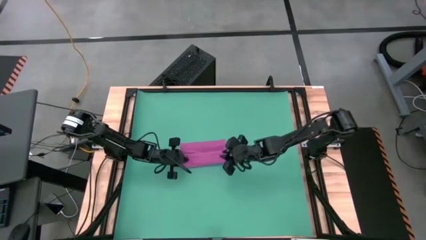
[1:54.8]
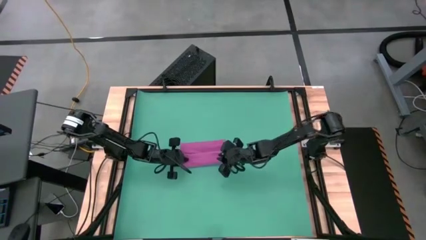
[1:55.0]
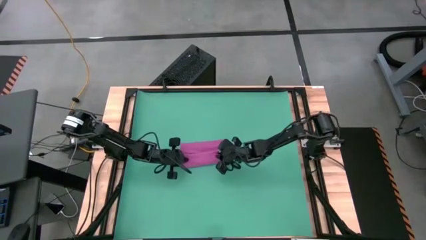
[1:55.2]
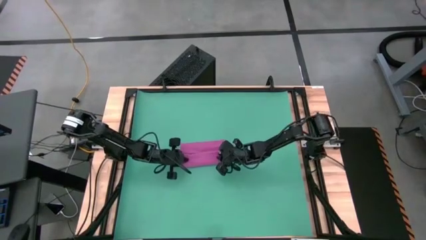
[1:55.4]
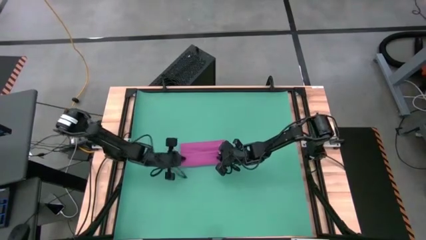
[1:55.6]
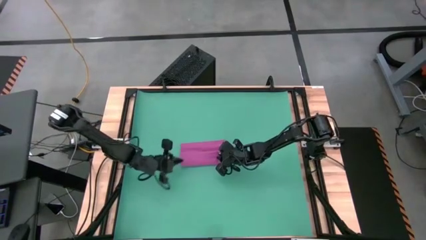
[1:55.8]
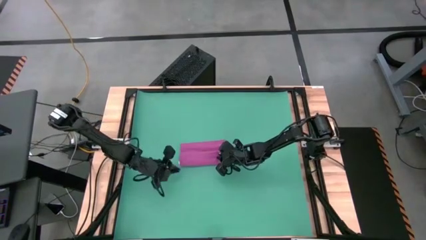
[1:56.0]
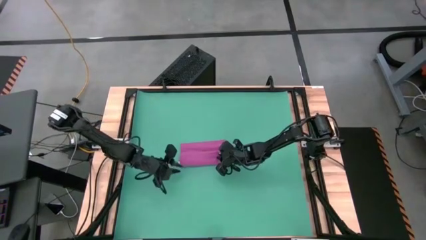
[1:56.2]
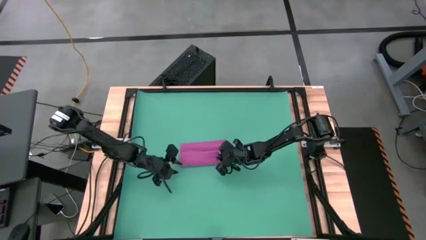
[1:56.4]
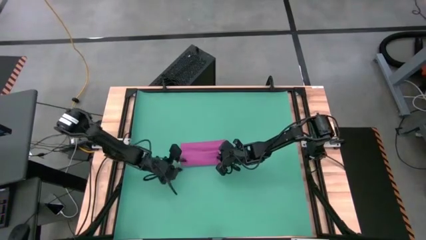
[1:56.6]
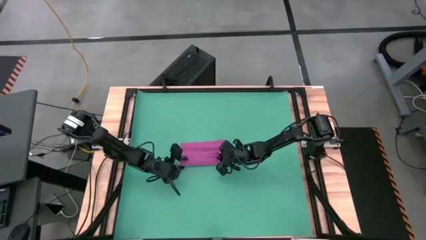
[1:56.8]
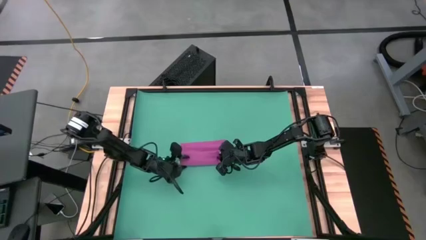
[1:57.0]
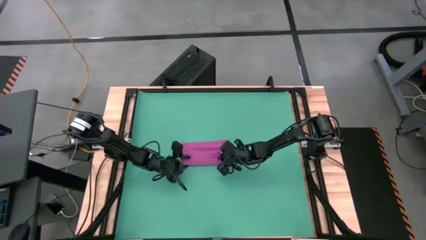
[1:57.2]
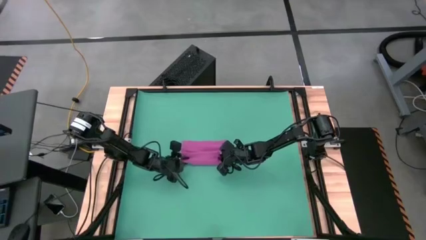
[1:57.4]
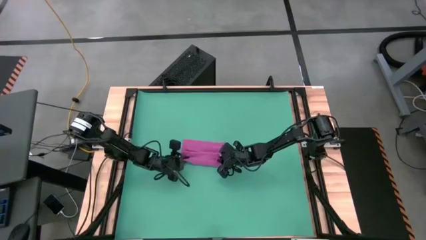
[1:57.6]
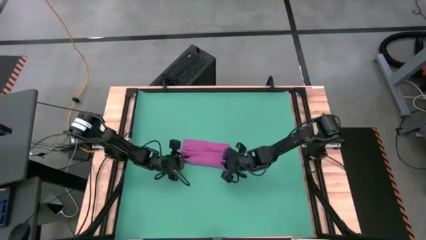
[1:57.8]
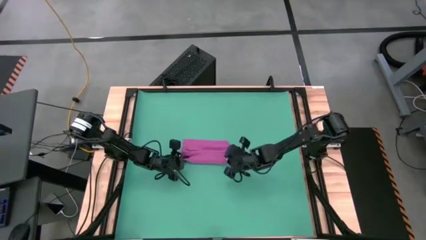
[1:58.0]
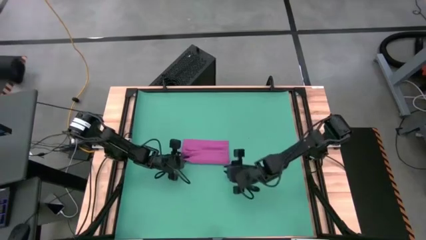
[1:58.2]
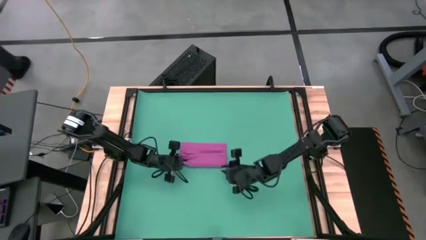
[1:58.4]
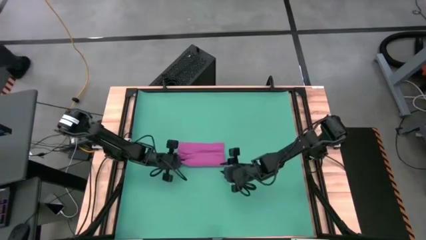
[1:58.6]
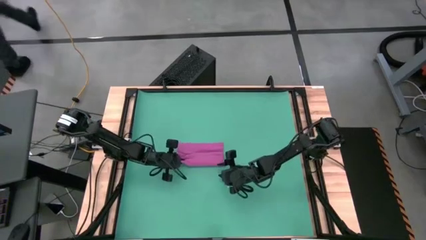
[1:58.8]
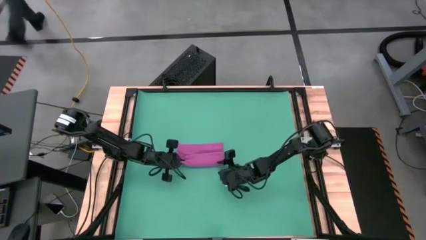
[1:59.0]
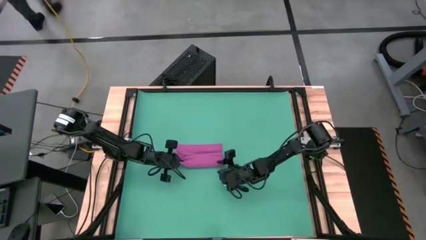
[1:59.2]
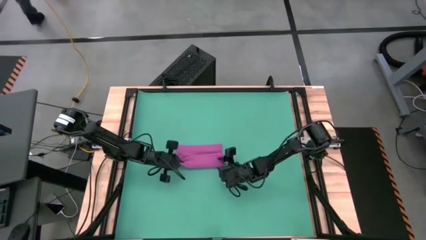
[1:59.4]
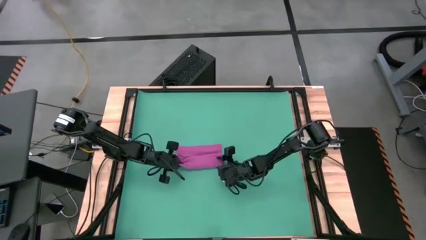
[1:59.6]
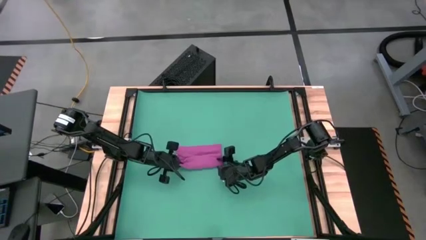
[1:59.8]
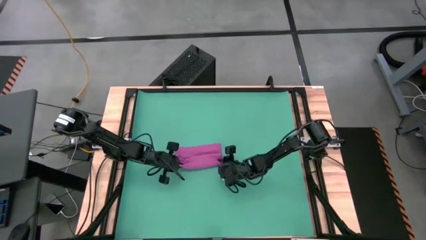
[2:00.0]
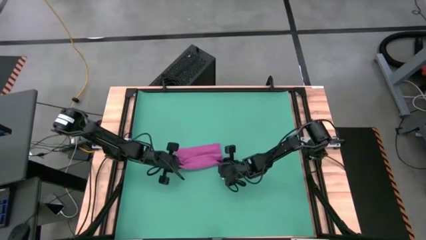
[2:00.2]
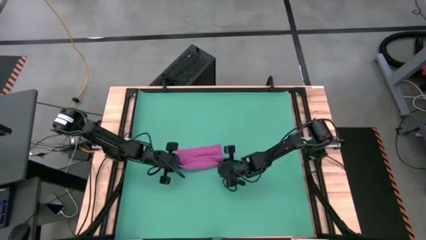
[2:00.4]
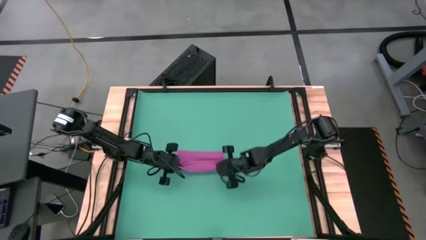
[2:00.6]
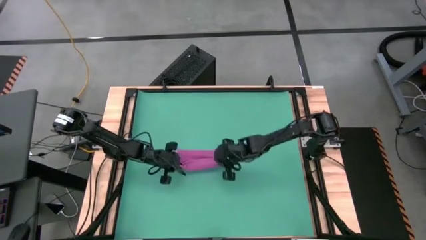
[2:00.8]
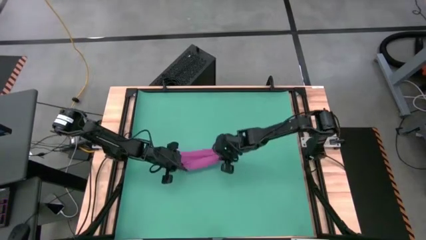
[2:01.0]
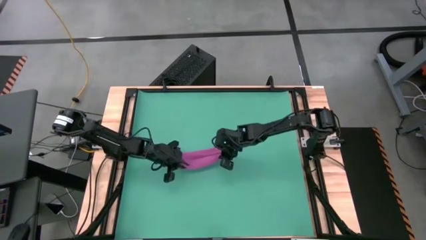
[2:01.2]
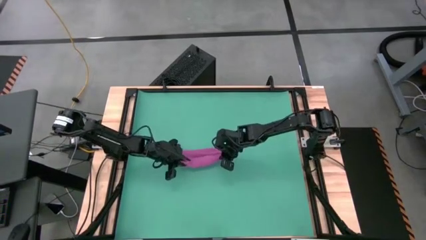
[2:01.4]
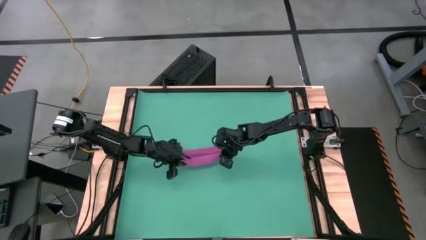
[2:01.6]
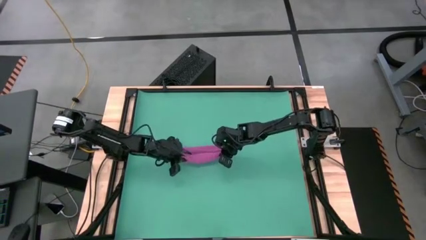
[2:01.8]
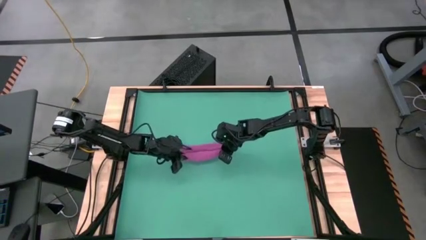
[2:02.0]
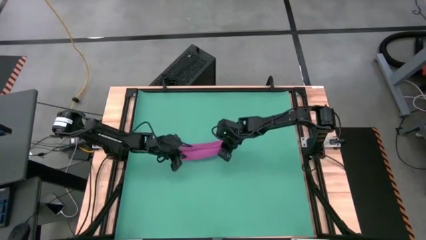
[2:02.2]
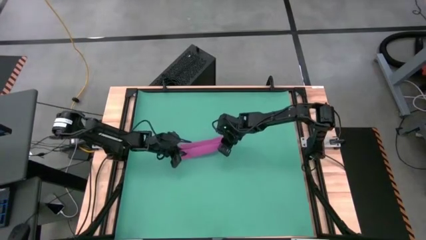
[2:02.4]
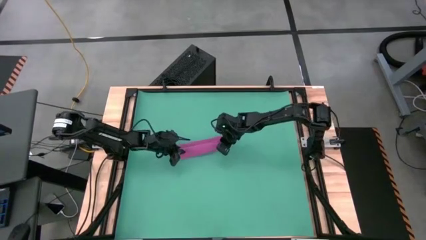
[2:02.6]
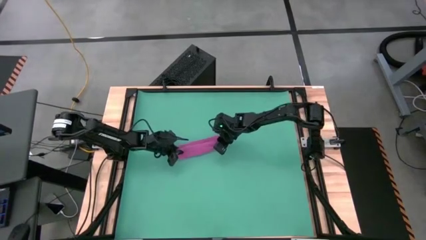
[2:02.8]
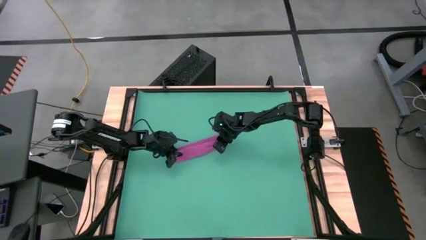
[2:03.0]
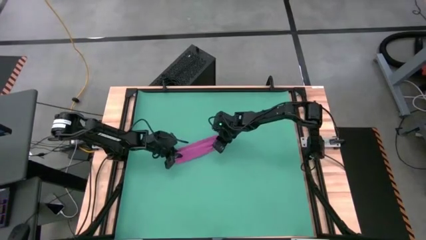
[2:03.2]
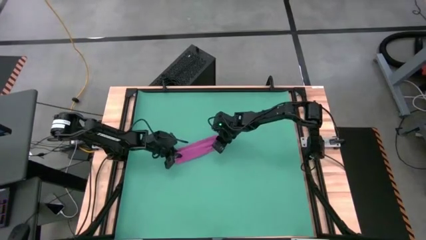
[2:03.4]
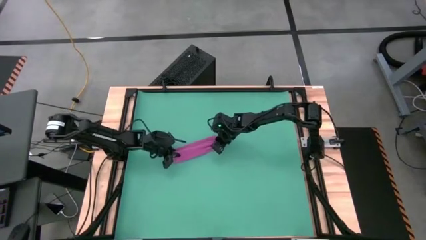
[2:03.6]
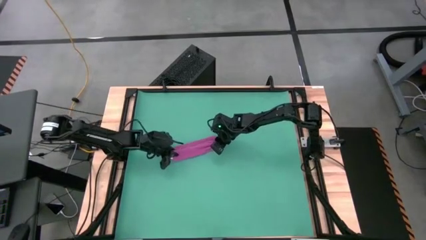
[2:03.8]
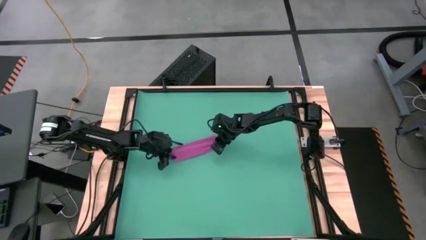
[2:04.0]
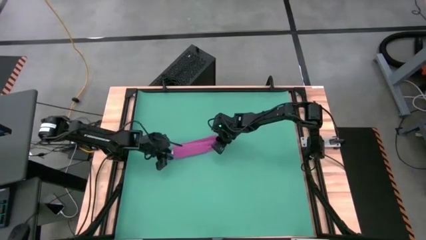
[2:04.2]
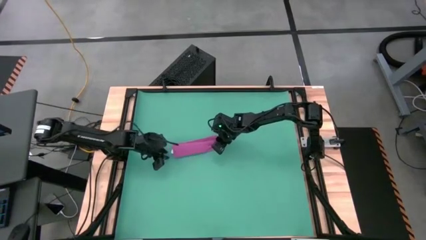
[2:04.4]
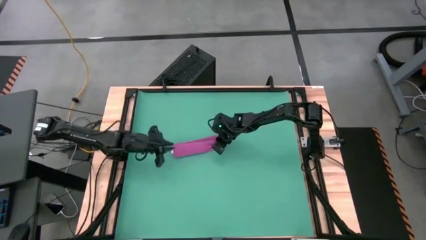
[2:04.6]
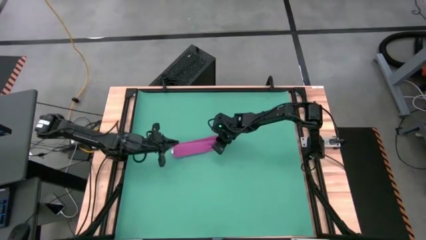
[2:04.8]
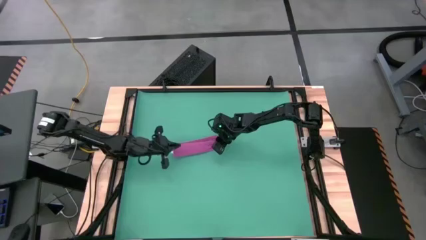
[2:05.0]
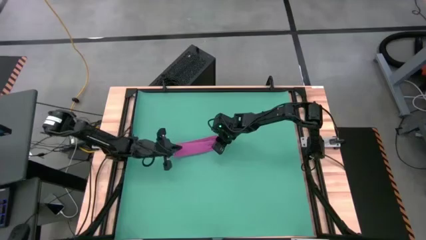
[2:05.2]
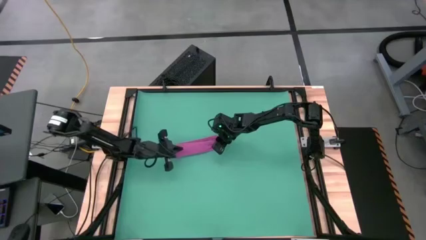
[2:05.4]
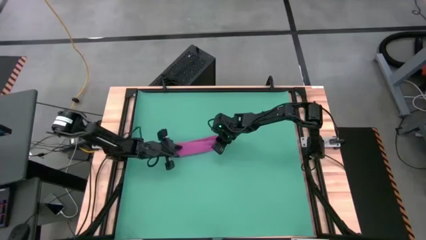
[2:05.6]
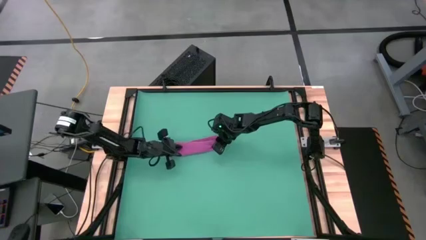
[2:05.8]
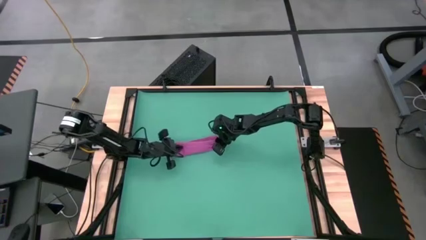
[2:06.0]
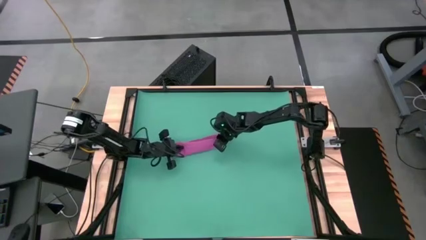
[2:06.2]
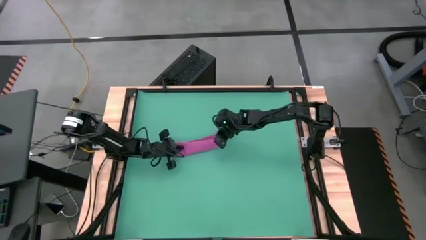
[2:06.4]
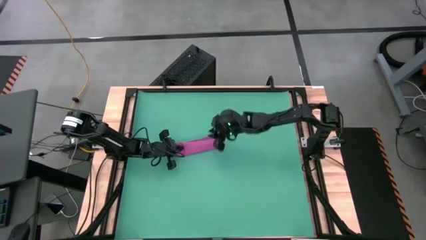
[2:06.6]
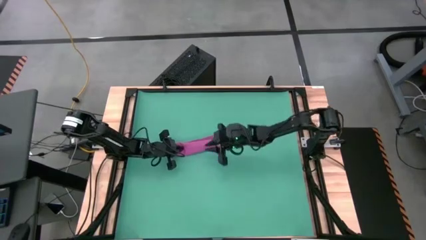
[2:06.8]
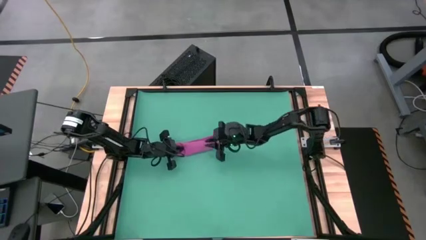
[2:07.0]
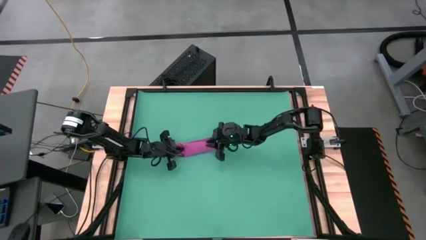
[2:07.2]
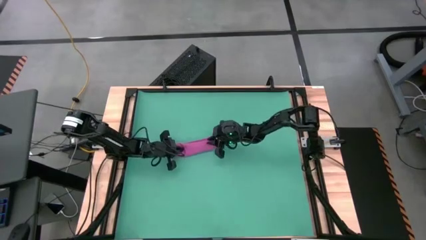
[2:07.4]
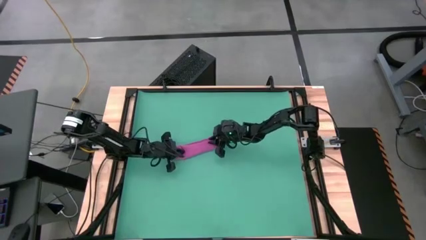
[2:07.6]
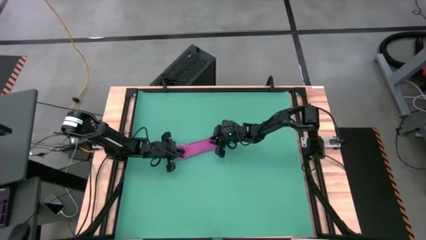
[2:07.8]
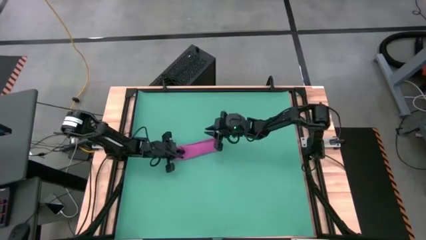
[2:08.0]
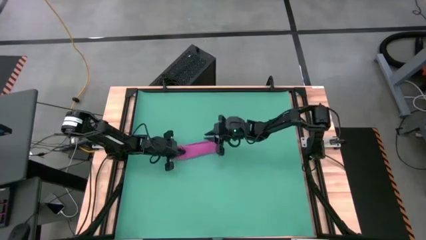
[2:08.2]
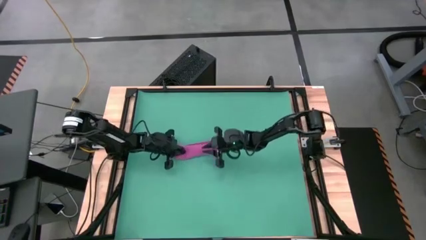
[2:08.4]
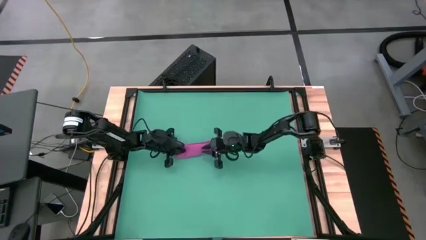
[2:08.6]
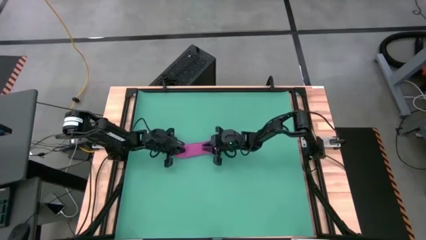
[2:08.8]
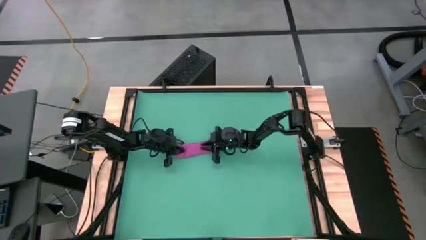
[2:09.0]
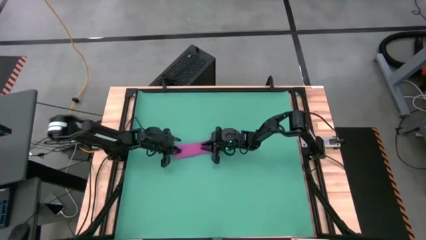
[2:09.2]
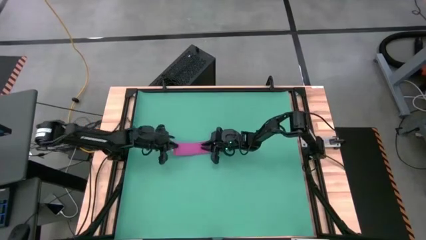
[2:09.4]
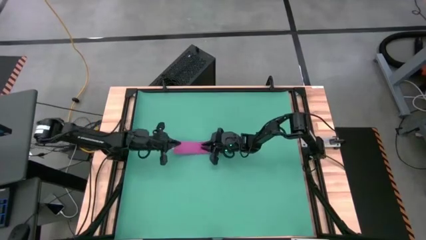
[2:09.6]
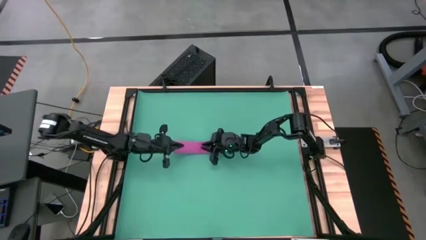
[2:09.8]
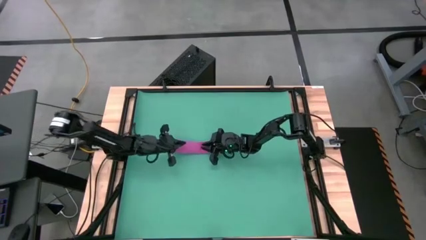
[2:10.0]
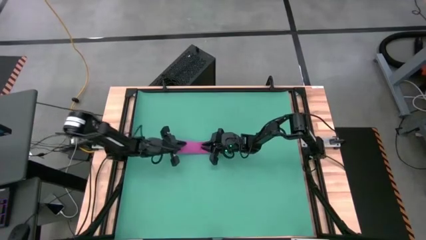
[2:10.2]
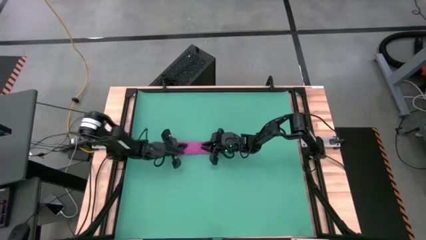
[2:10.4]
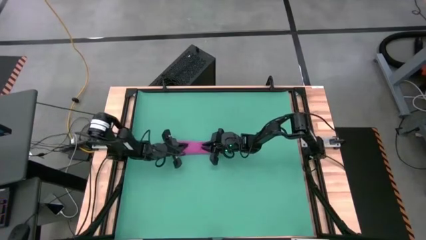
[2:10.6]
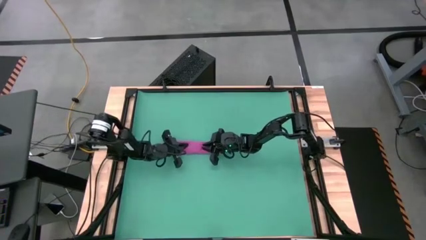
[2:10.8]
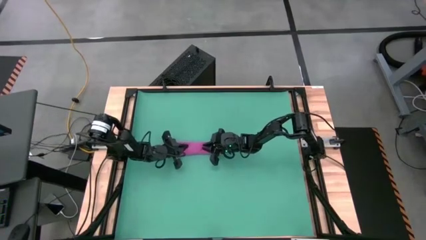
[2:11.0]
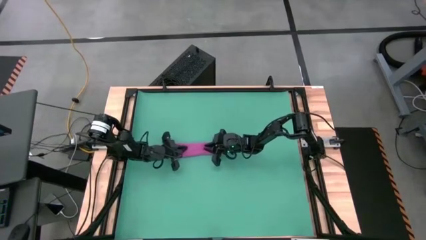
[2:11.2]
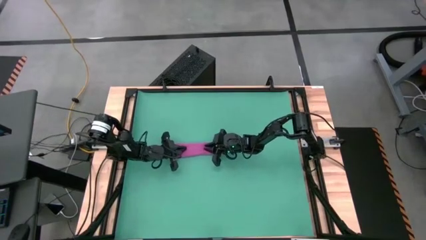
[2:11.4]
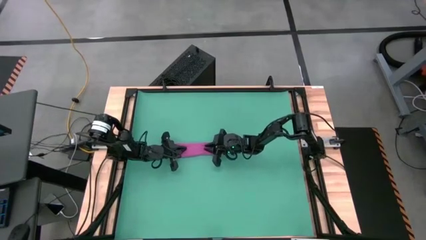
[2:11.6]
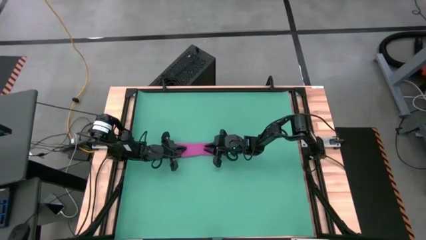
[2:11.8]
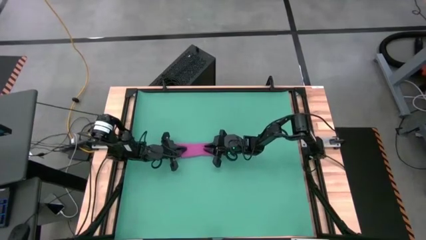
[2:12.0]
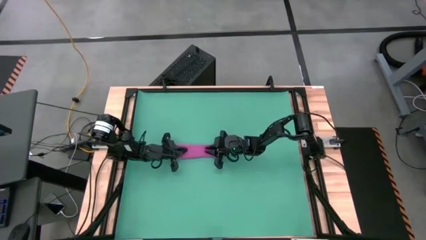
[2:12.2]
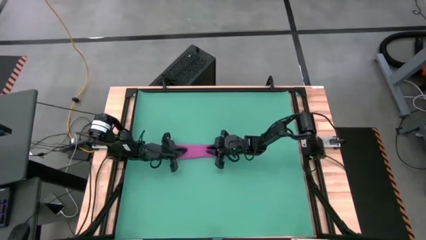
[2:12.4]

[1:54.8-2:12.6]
Task: Roll towel
Roll the pink towel
